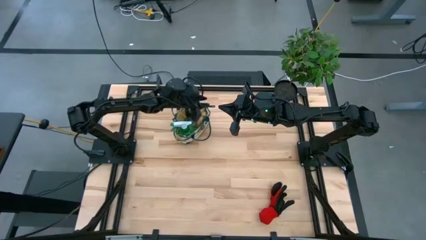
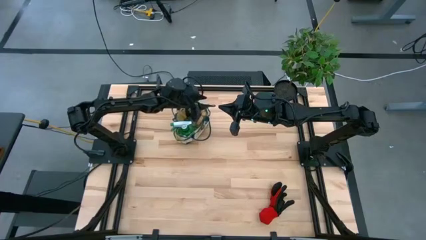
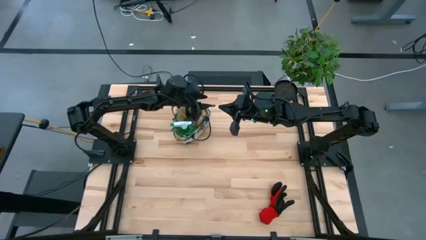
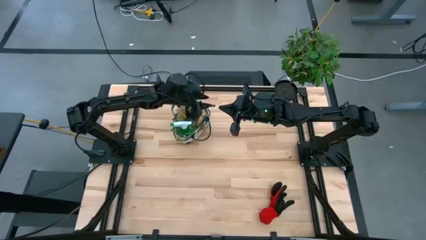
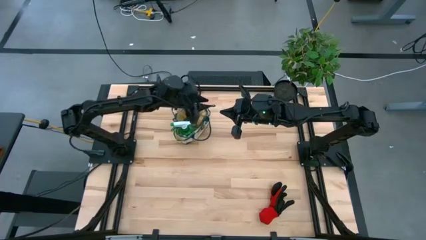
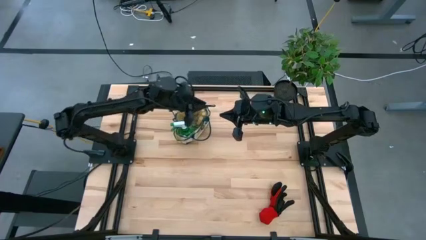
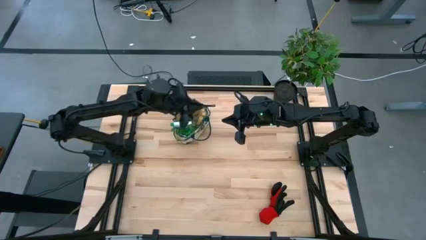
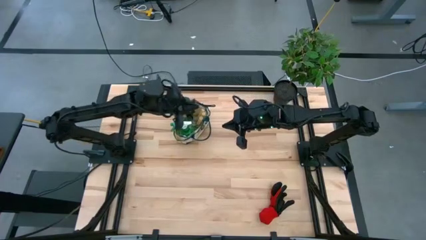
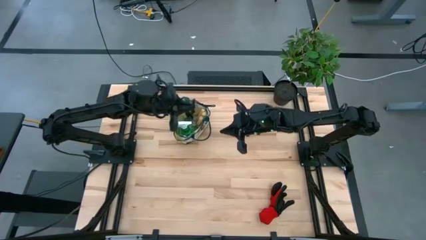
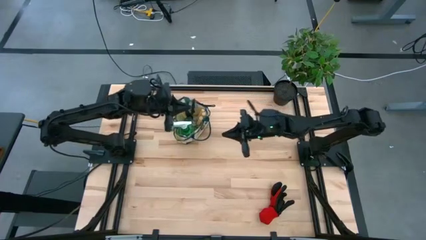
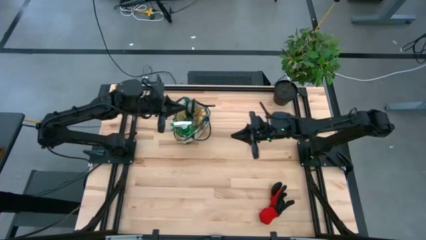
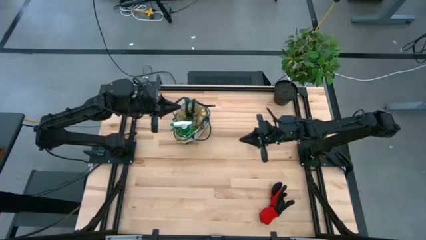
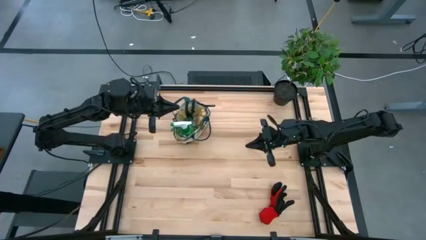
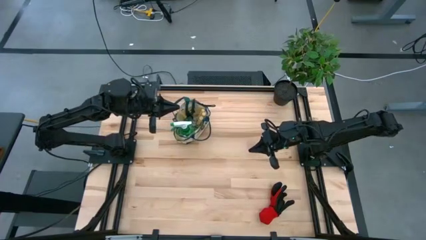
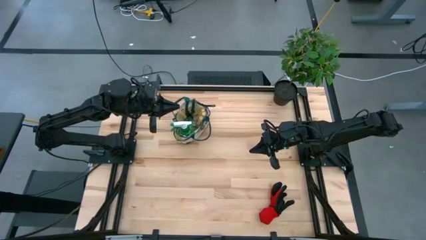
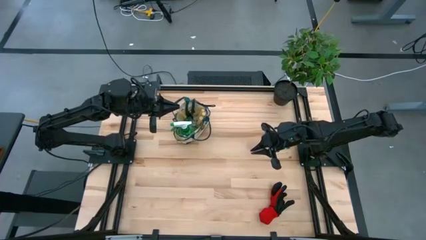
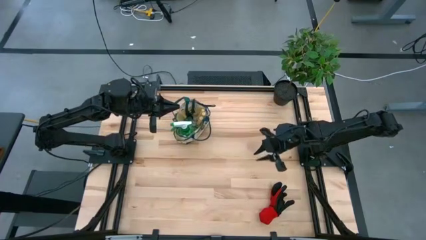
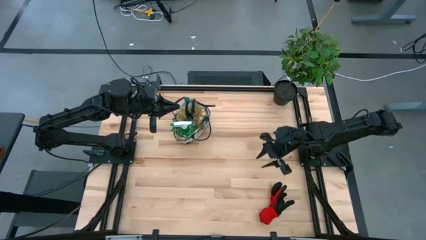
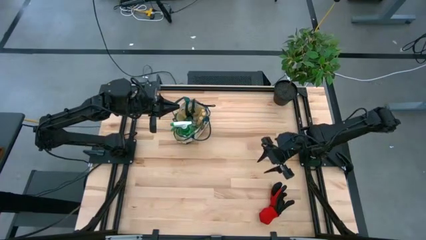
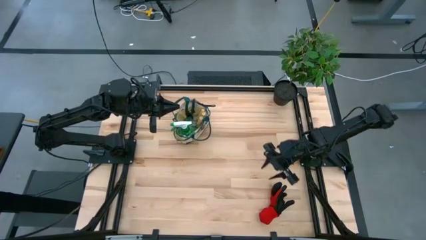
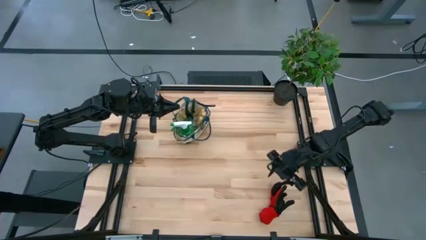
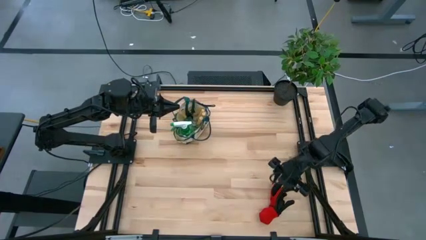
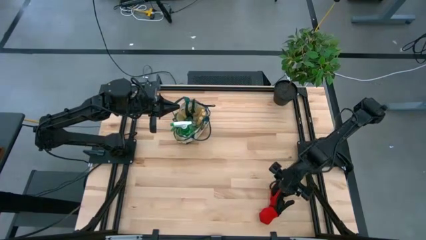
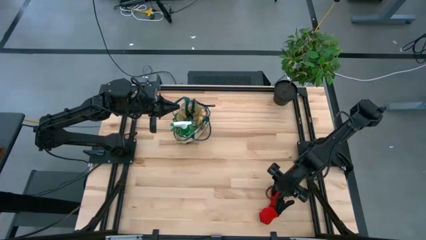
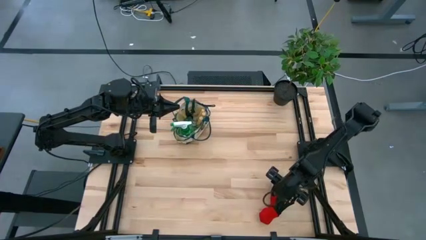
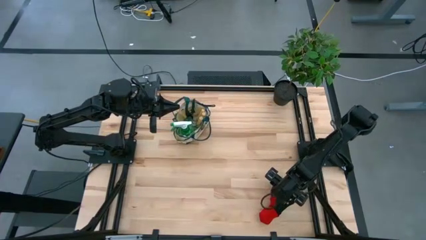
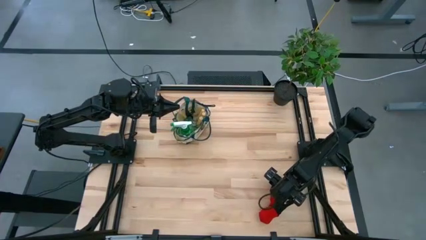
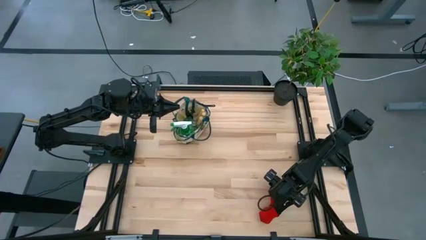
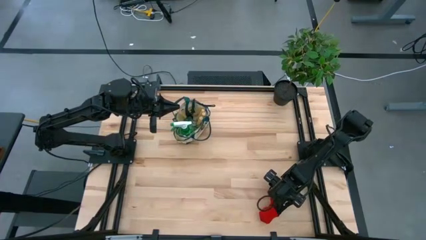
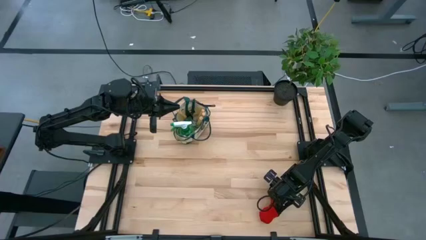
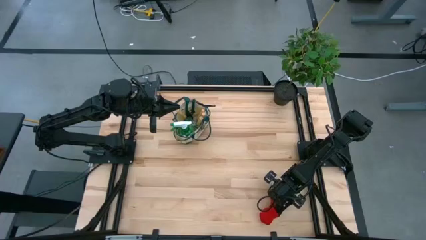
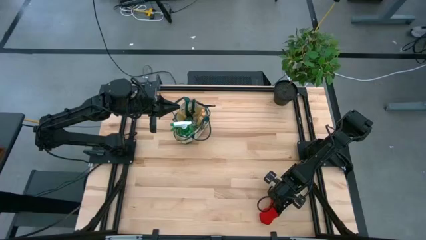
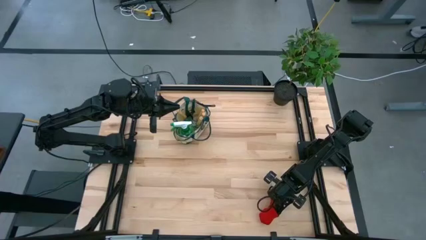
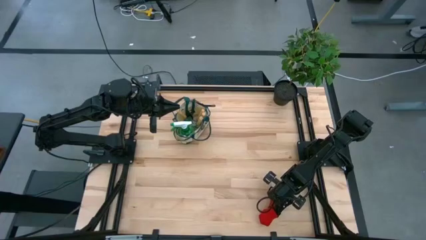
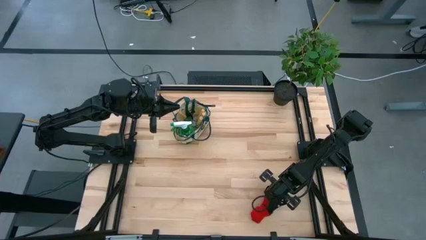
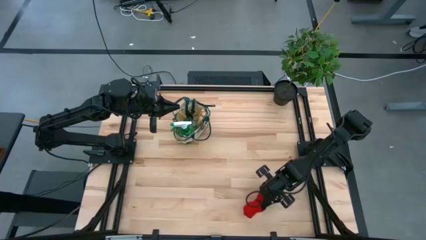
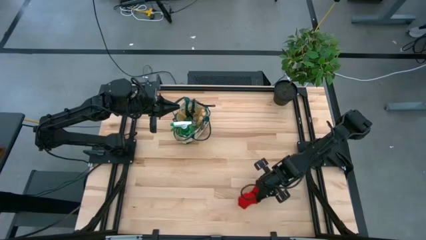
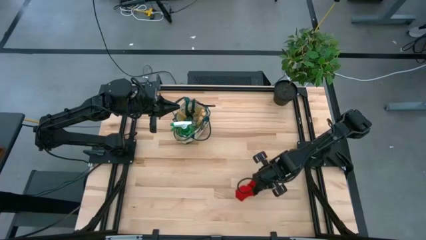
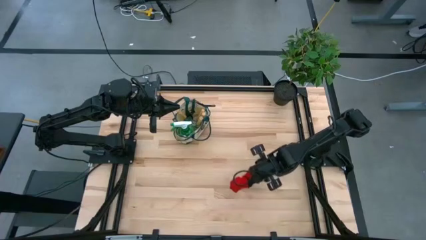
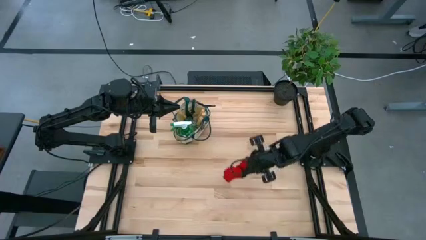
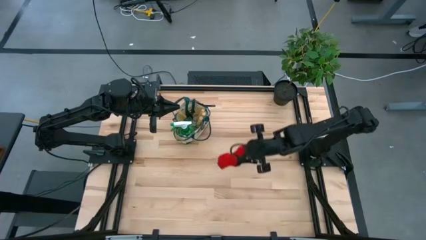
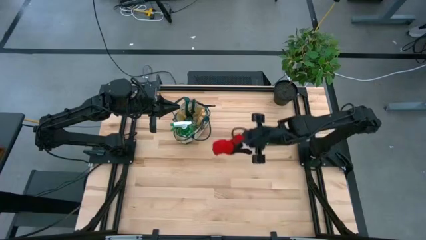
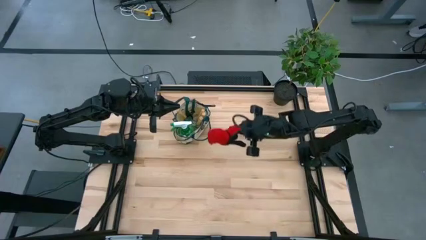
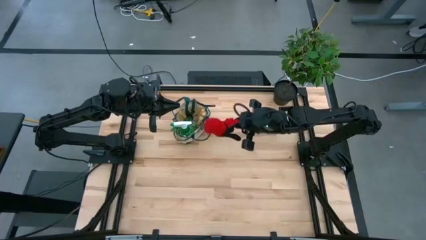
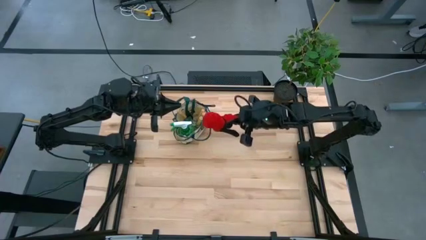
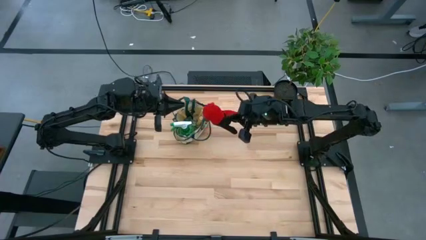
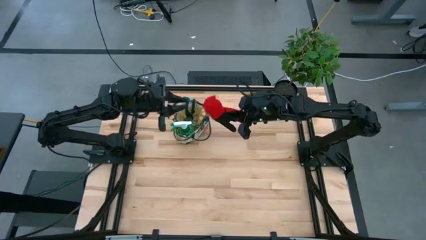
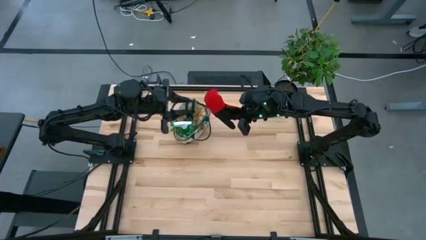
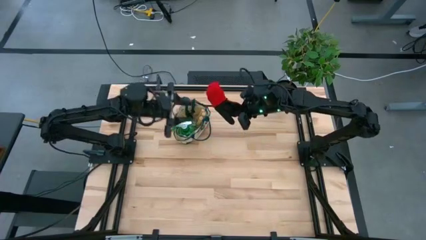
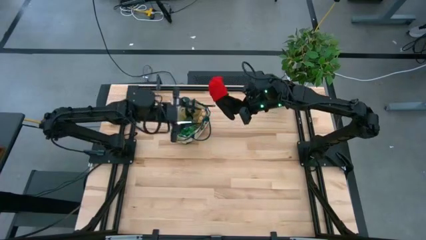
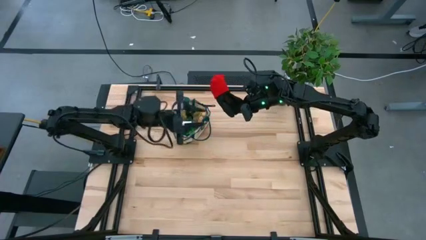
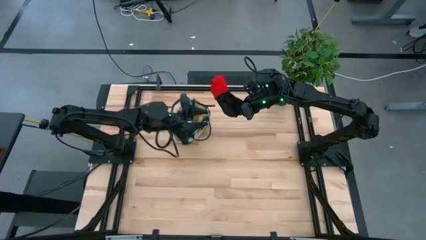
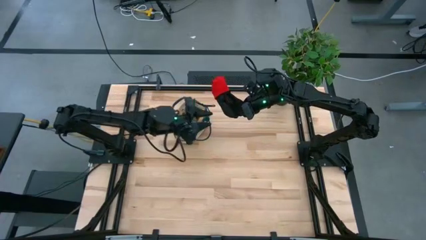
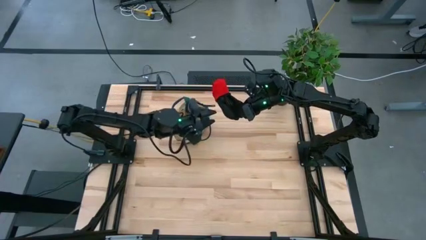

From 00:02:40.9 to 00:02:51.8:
Task: Pick & Place Garden tools in Gardening bag
Put the red gloves into the gardening bag
